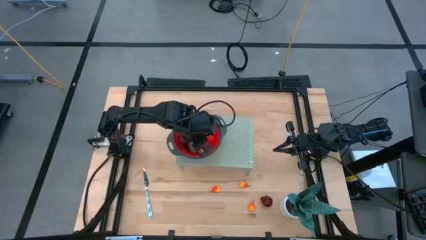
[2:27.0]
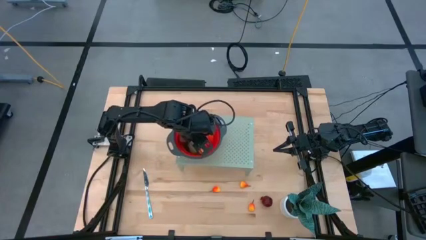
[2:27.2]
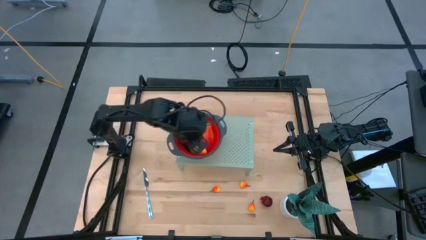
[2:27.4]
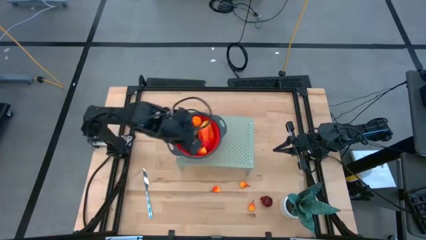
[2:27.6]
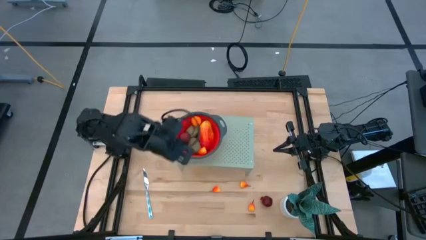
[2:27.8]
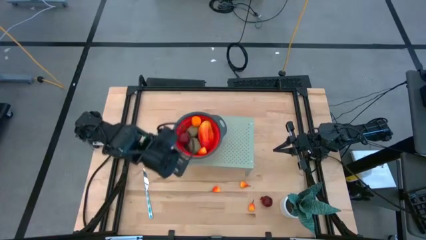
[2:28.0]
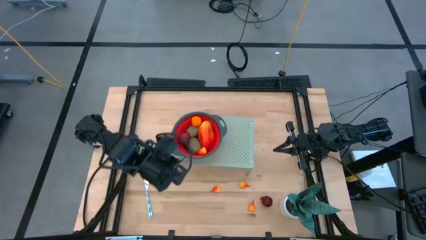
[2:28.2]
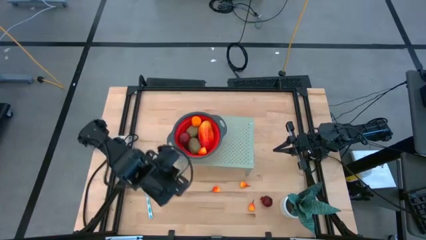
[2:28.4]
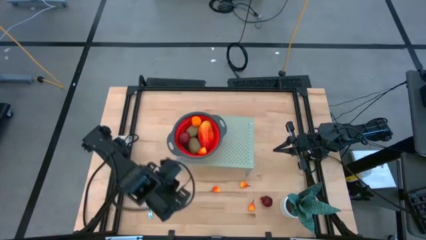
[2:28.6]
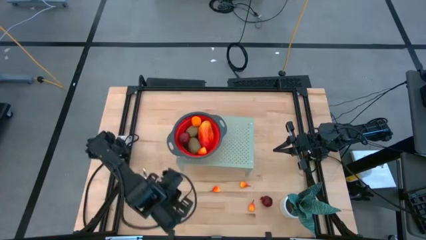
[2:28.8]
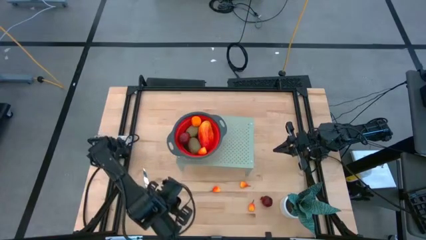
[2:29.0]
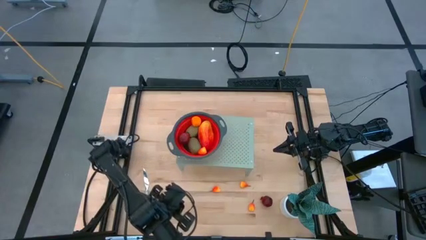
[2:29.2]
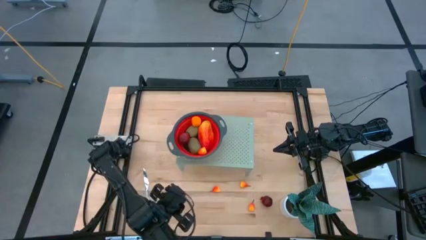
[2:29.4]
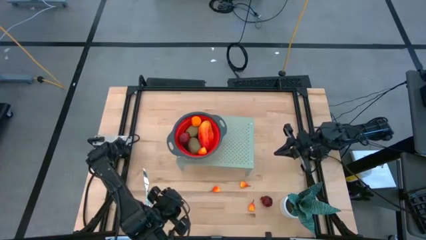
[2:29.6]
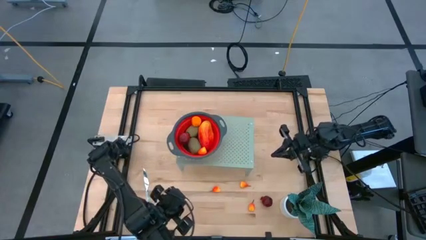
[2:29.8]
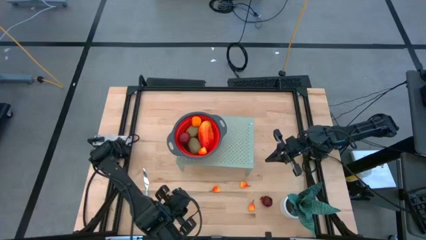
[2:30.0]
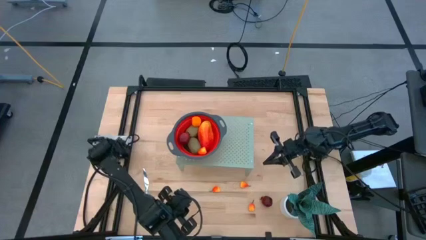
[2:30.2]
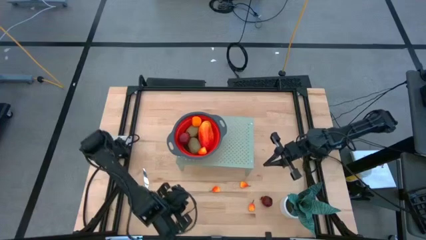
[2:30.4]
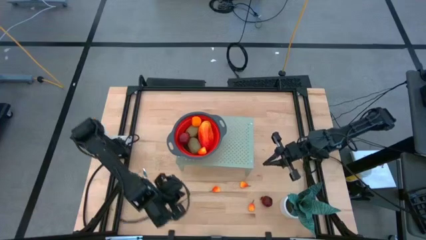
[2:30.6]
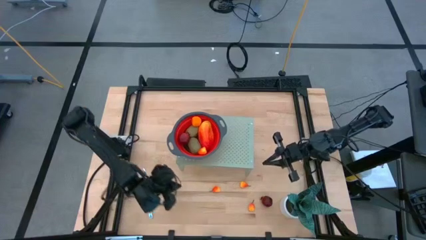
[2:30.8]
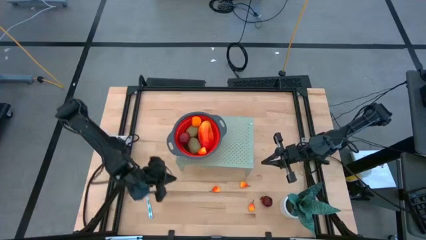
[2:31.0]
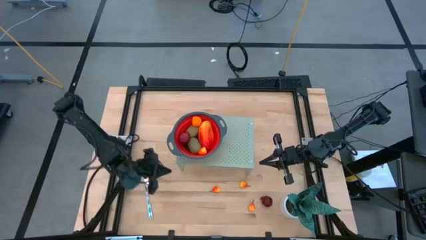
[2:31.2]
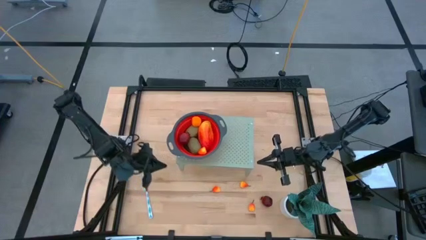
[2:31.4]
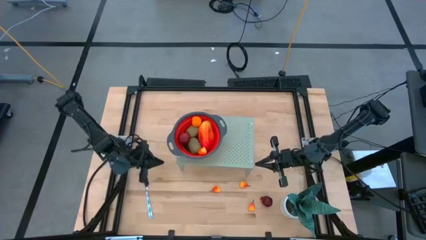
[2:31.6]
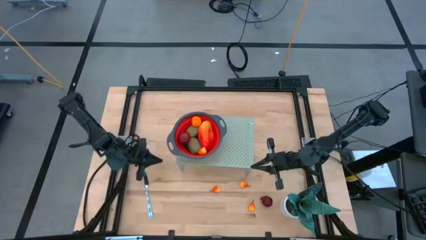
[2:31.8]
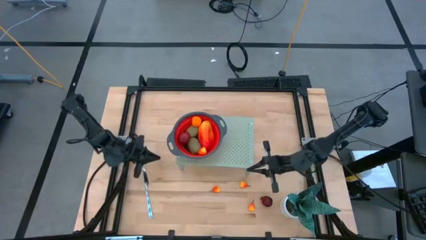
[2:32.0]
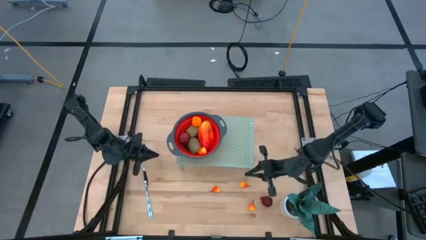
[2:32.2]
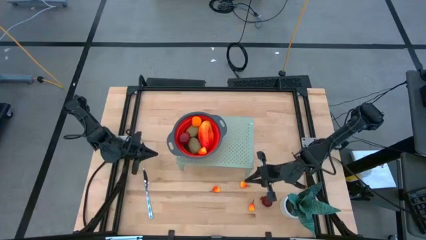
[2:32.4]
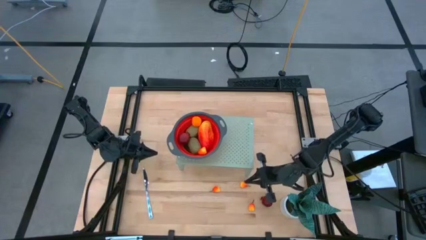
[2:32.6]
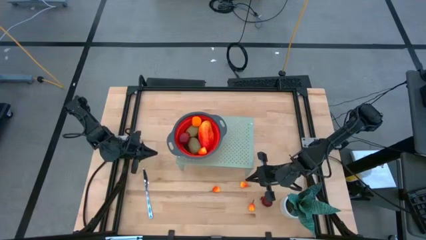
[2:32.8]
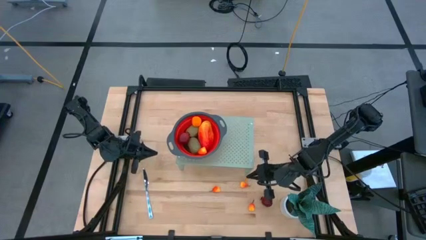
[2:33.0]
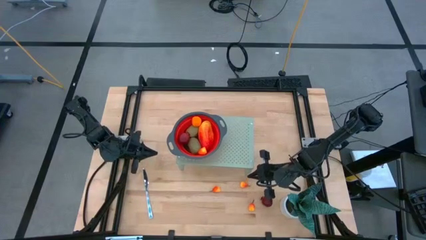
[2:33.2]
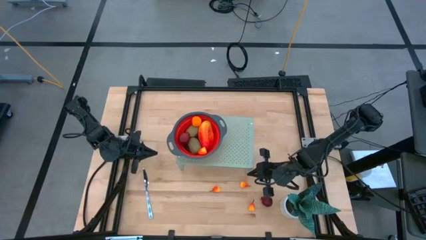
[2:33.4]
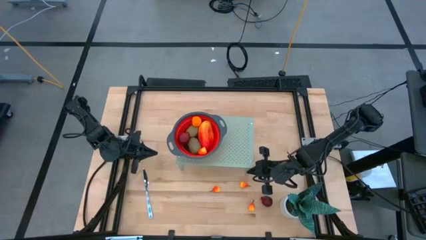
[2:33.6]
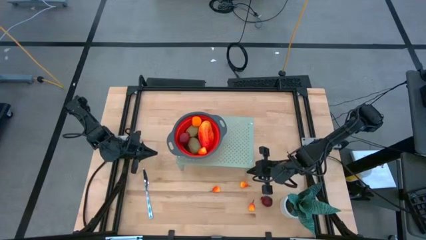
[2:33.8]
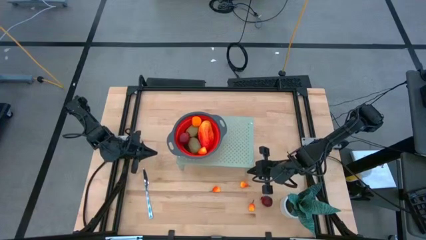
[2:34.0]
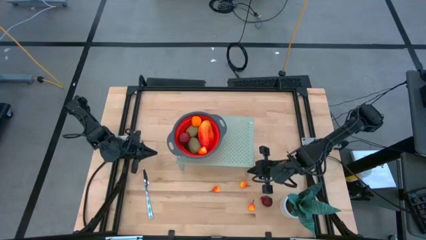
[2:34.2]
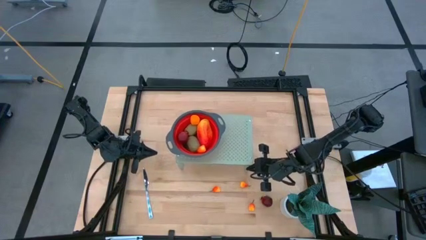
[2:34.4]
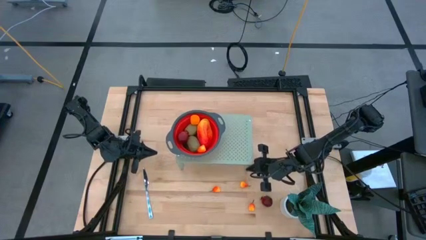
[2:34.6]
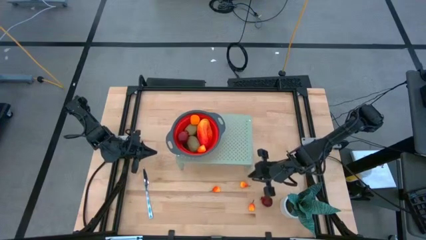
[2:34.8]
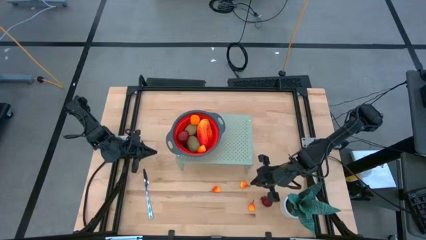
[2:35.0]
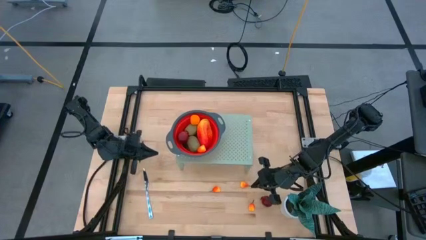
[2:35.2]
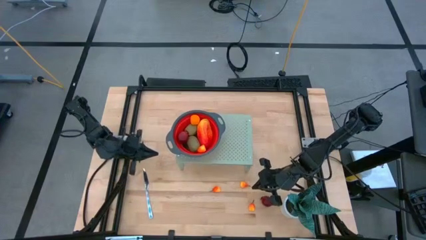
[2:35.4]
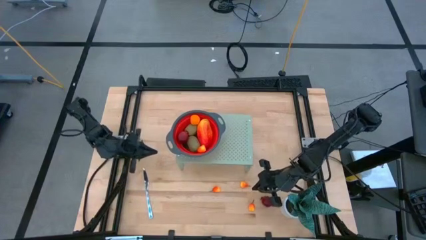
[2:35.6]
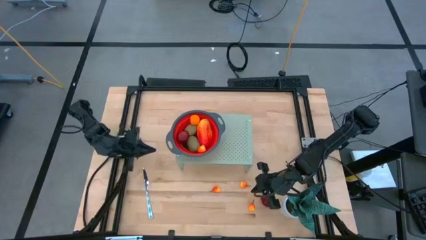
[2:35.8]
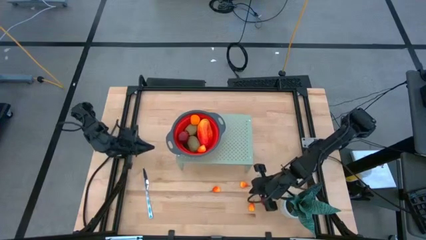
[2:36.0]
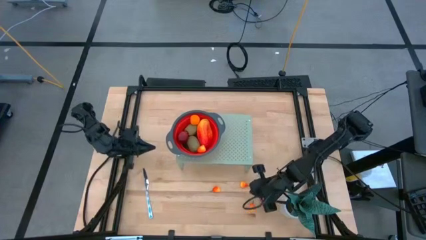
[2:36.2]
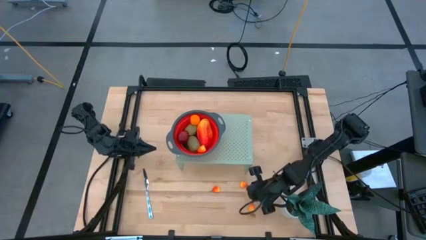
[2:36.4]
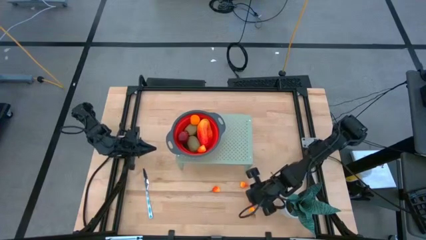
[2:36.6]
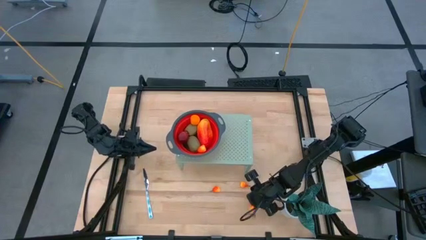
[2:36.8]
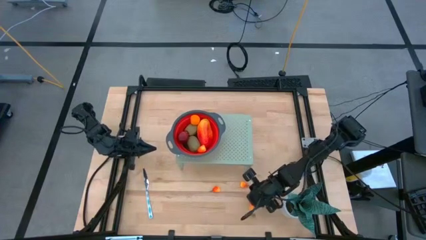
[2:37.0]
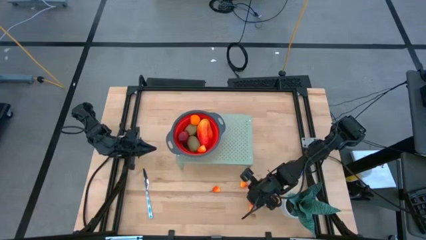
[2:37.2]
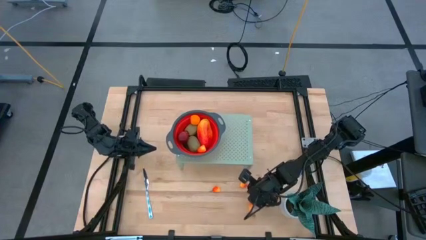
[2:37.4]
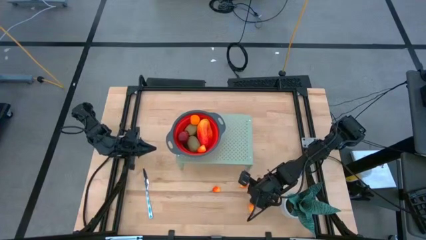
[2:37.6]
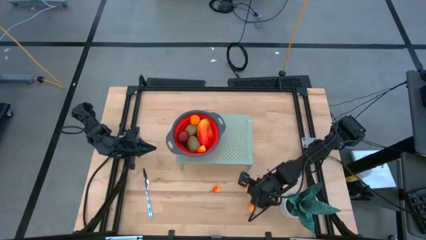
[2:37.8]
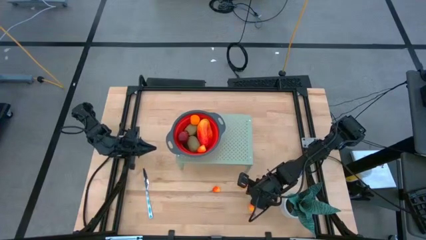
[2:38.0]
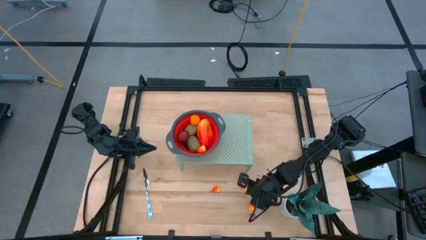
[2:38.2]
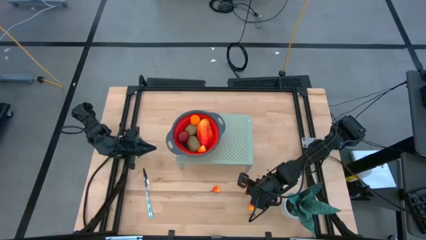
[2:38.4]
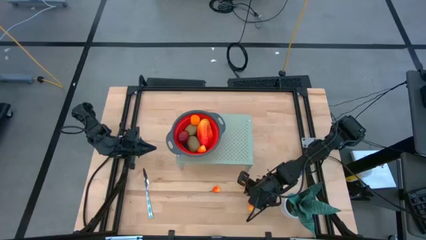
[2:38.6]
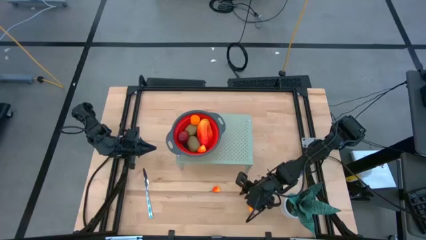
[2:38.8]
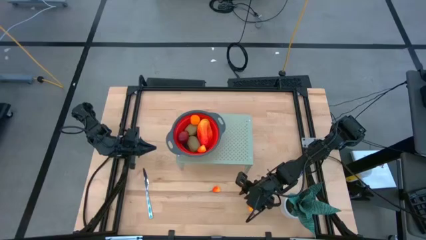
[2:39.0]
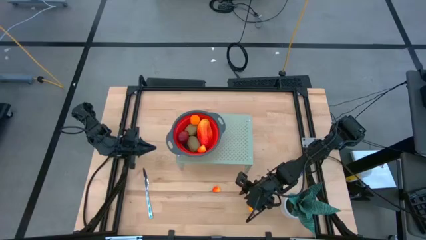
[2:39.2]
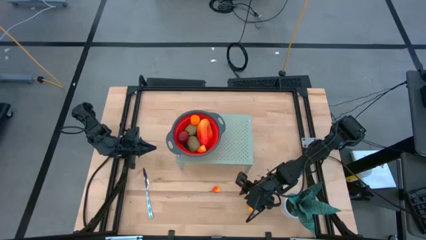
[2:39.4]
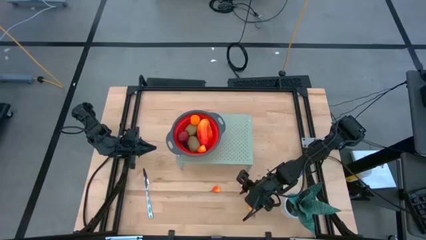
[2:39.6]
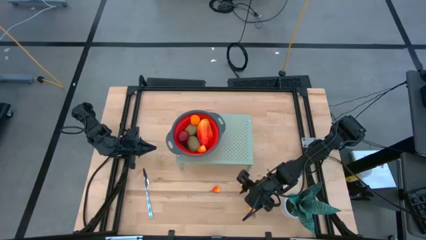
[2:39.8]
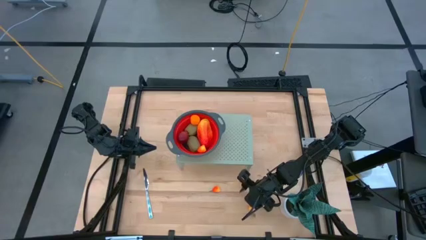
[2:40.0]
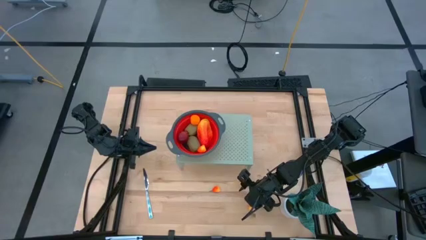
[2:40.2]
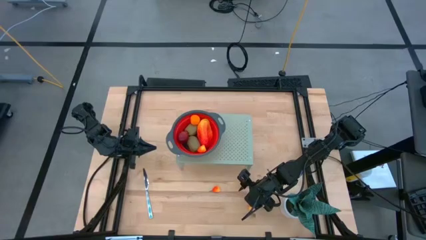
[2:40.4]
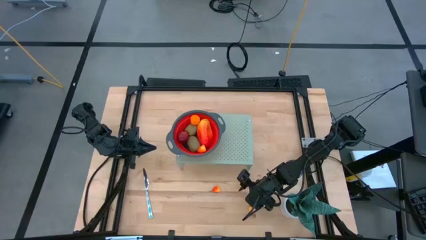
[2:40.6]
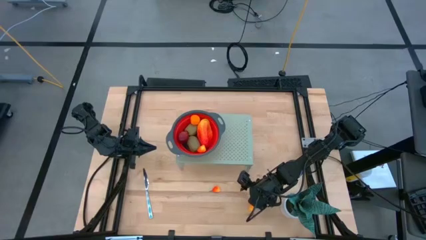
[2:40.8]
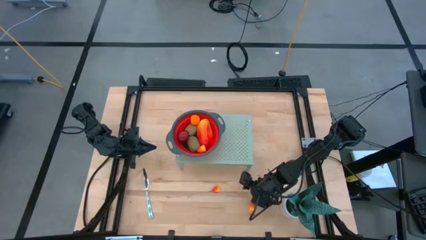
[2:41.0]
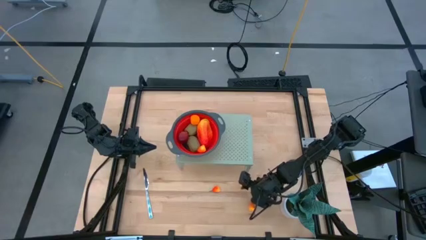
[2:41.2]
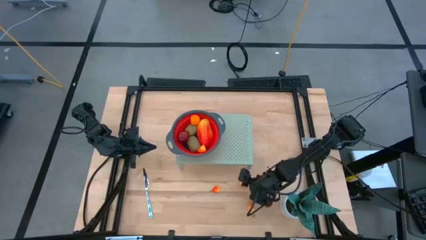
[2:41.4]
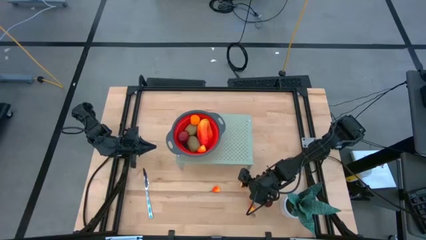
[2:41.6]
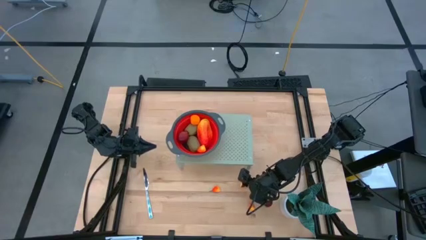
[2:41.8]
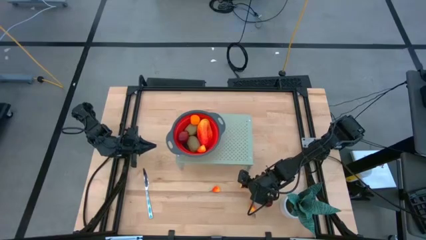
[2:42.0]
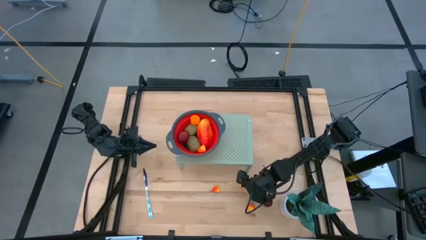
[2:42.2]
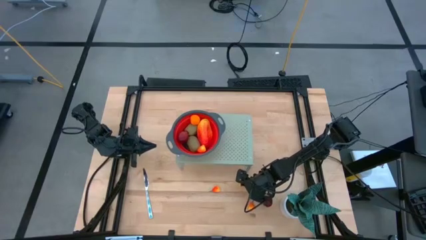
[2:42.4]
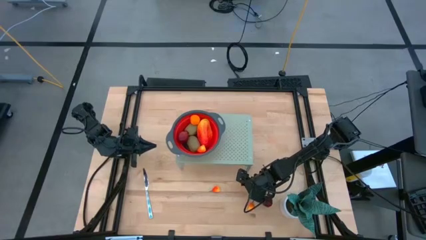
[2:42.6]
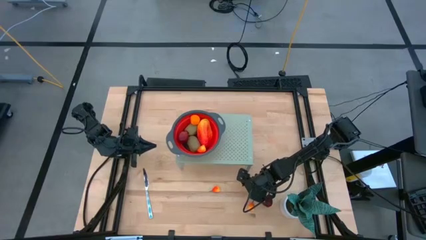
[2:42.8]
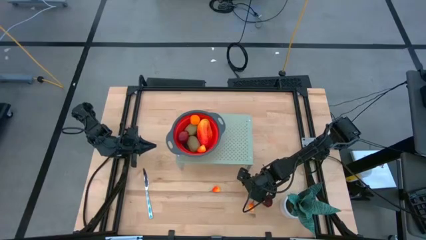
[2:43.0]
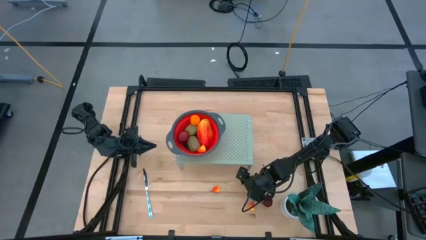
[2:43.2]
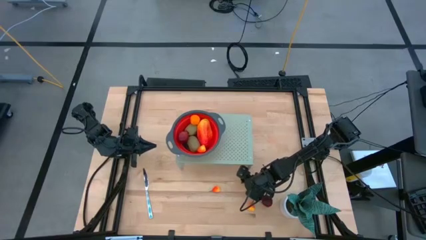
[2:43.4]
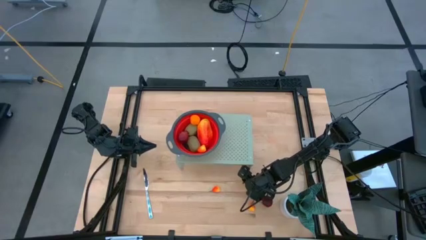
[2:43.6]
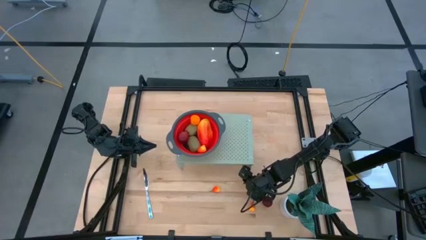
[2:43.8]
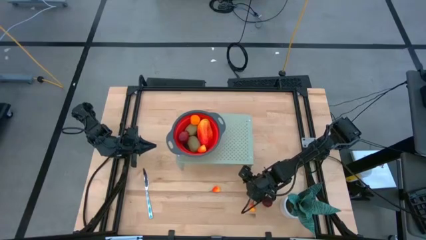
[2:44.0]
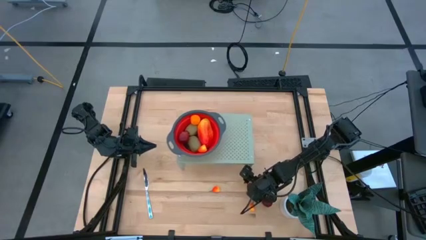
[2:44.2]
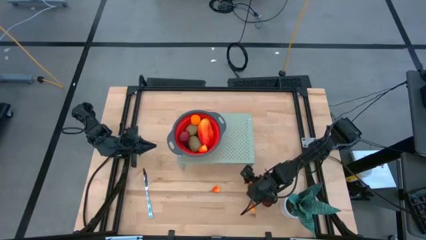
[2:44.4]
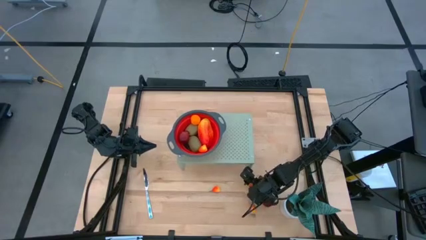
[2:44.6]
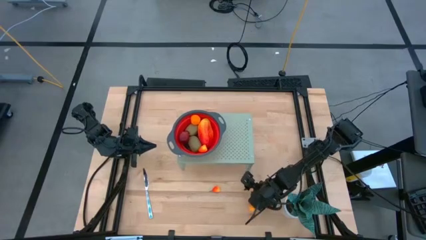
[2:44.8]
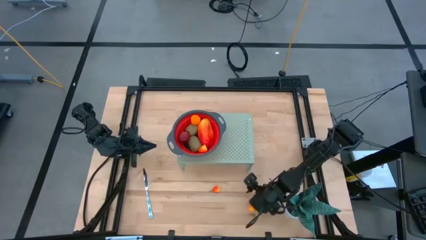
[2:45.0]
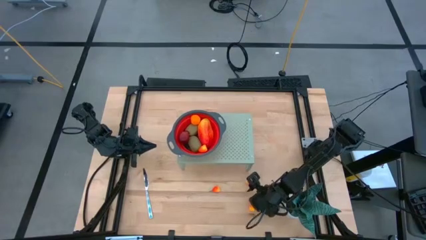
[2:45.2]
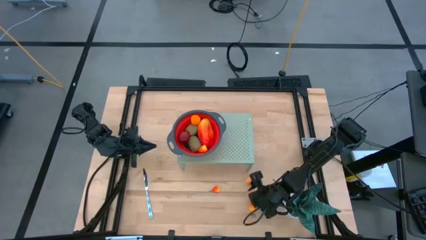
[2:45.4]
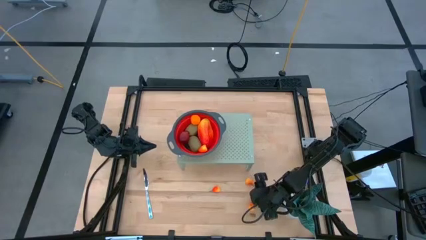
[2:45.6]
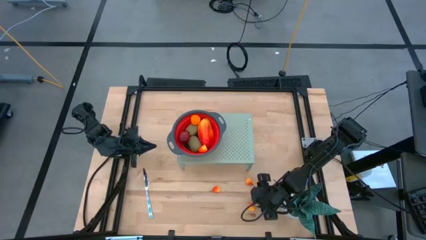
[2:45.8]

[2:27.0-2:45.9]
Task: Pick & Place Fruit
Put the peach fruit into the strainer
